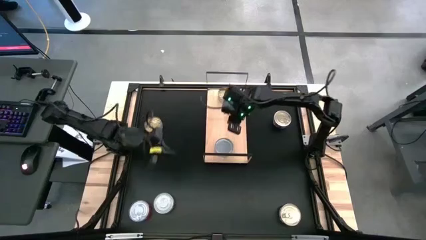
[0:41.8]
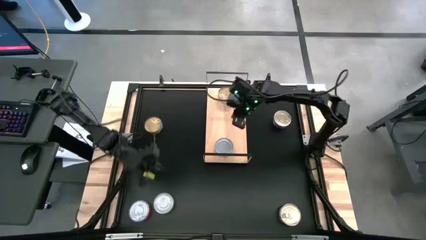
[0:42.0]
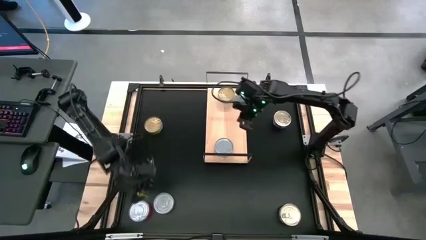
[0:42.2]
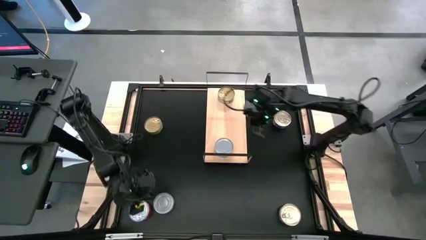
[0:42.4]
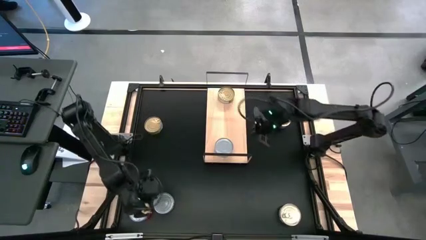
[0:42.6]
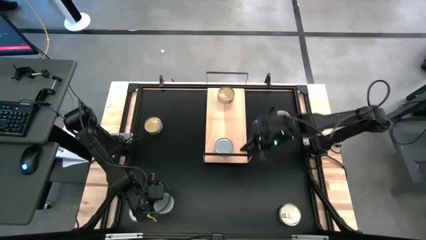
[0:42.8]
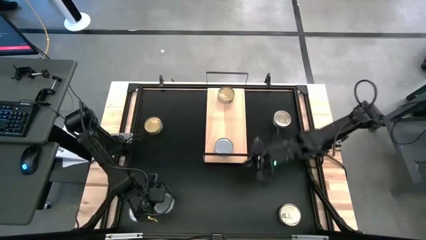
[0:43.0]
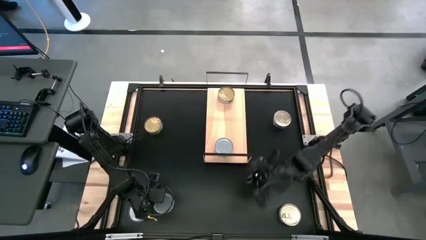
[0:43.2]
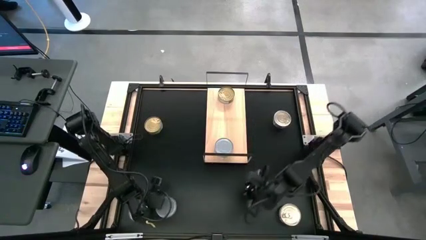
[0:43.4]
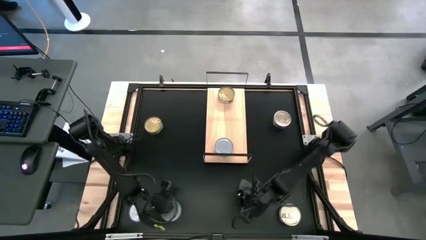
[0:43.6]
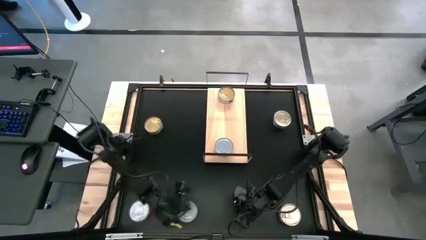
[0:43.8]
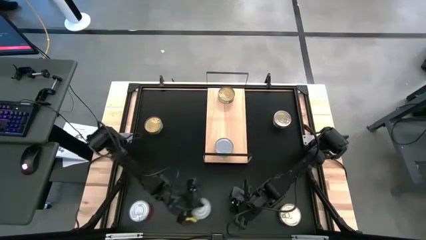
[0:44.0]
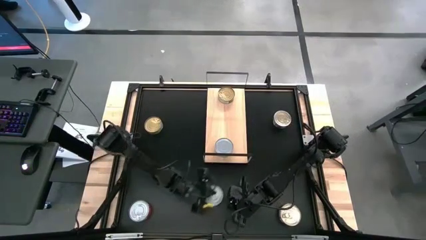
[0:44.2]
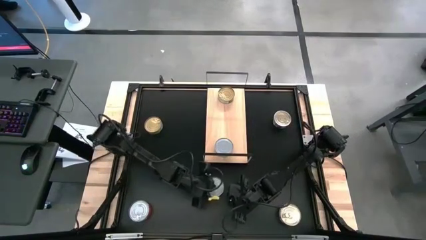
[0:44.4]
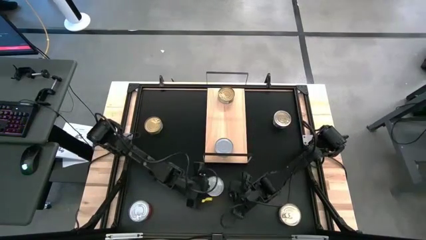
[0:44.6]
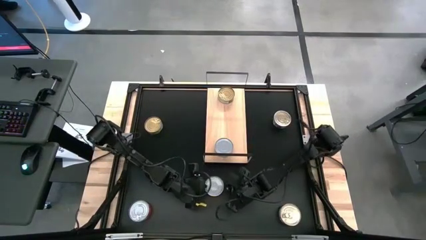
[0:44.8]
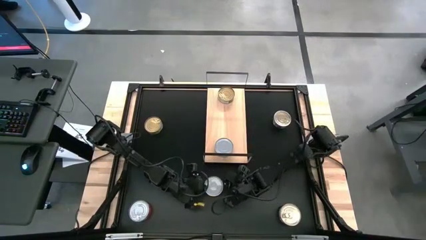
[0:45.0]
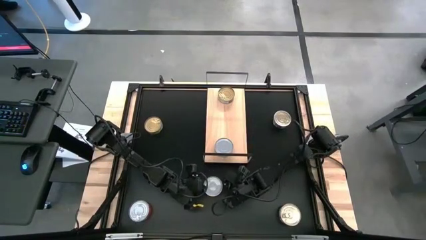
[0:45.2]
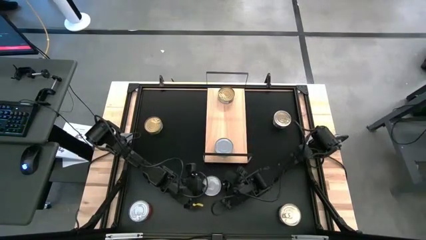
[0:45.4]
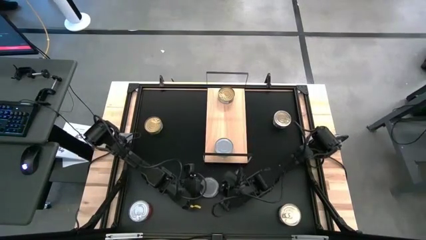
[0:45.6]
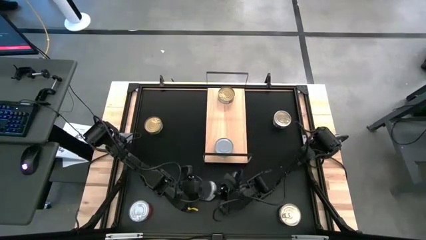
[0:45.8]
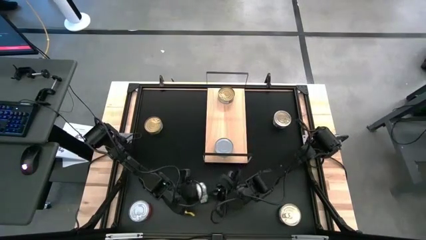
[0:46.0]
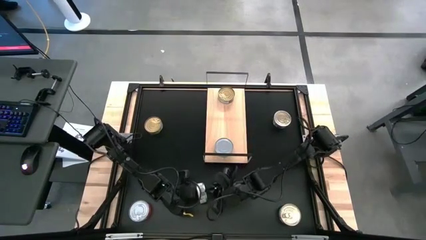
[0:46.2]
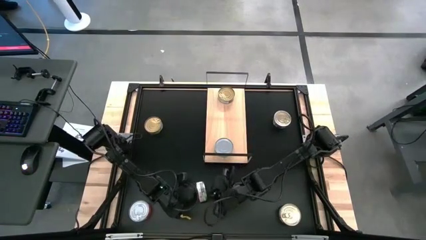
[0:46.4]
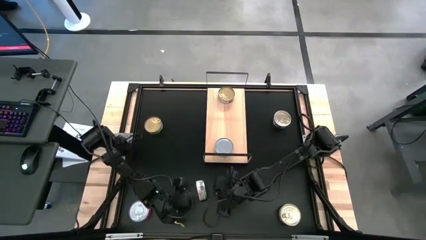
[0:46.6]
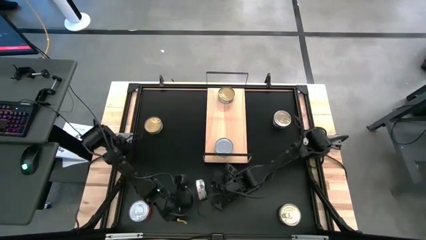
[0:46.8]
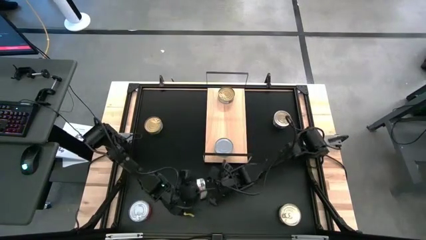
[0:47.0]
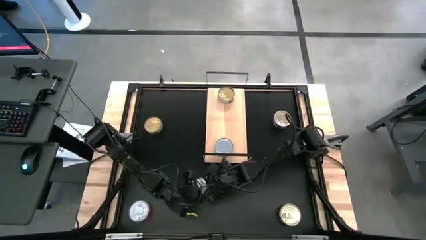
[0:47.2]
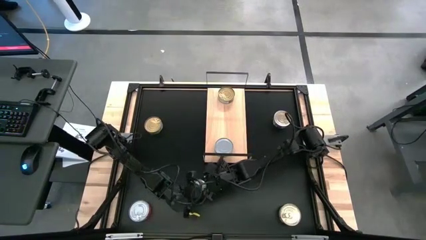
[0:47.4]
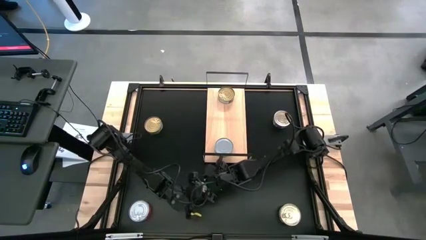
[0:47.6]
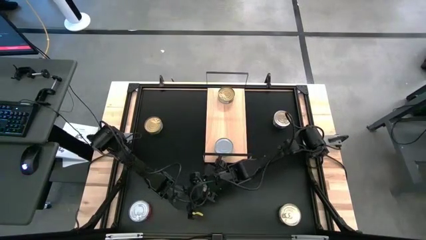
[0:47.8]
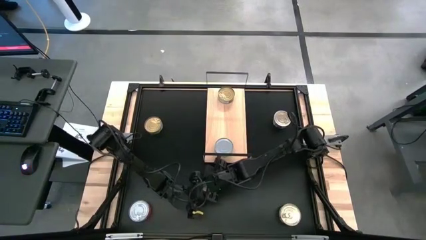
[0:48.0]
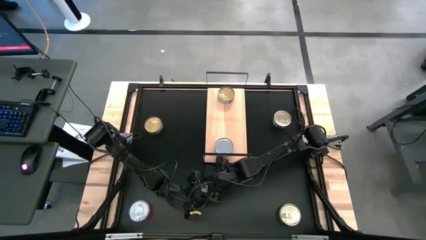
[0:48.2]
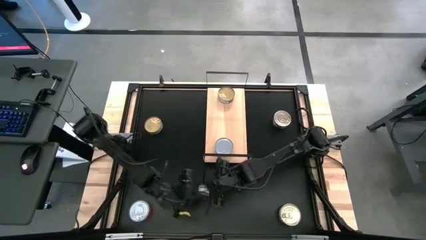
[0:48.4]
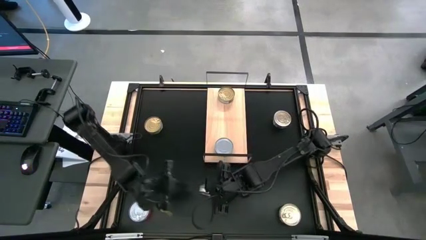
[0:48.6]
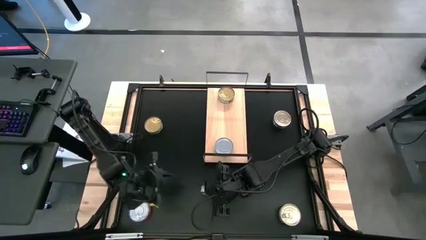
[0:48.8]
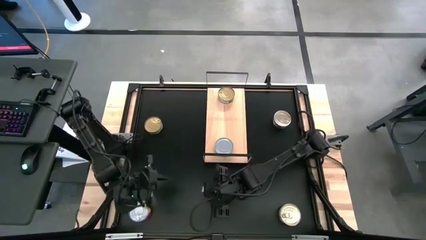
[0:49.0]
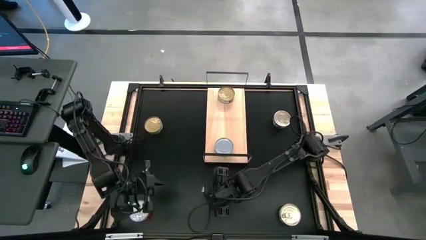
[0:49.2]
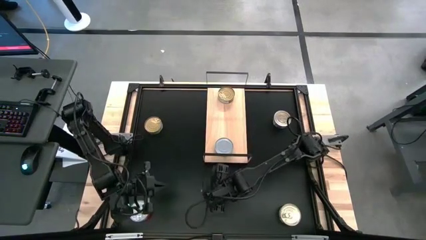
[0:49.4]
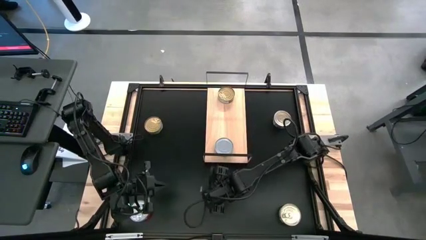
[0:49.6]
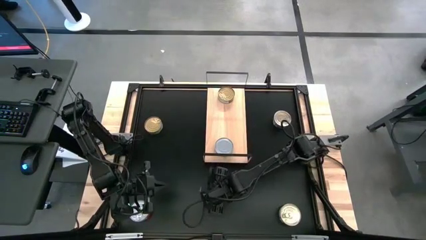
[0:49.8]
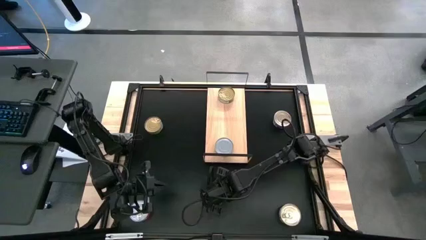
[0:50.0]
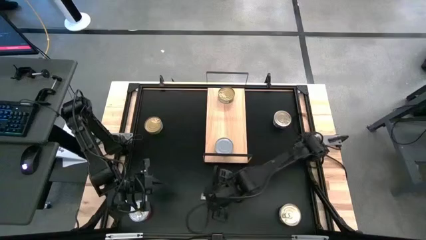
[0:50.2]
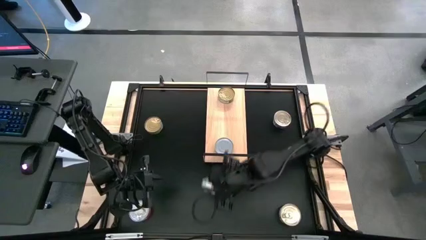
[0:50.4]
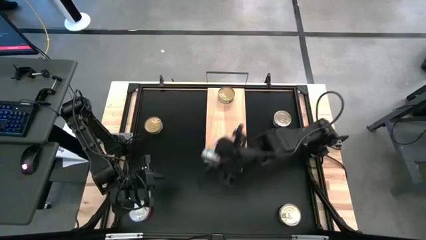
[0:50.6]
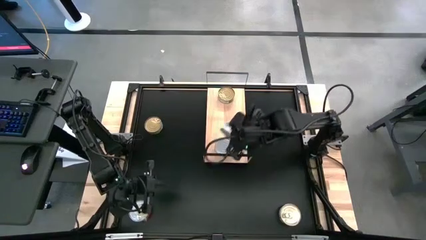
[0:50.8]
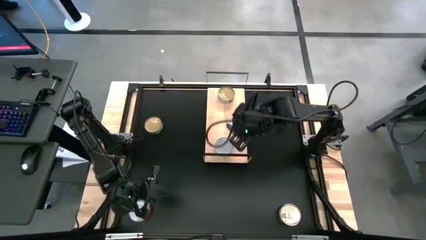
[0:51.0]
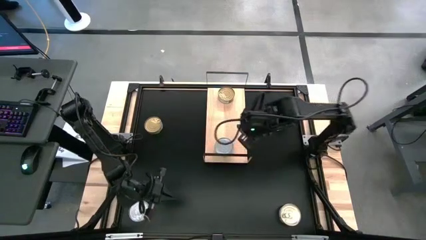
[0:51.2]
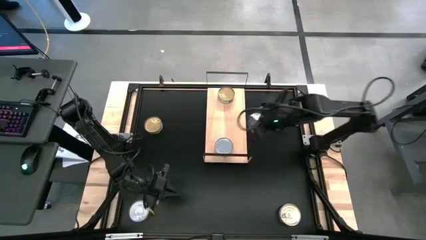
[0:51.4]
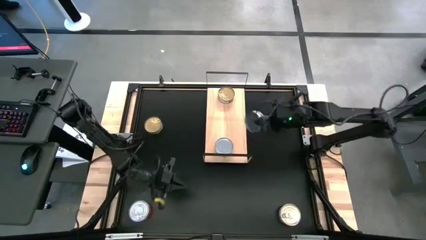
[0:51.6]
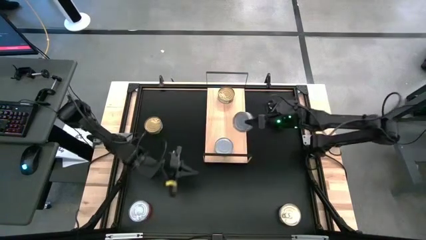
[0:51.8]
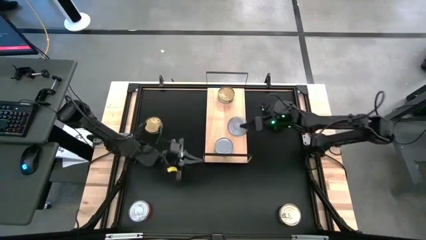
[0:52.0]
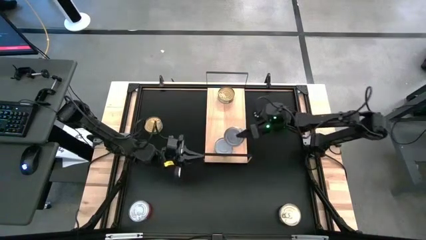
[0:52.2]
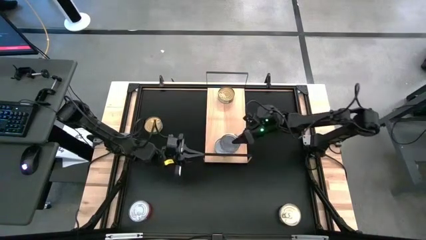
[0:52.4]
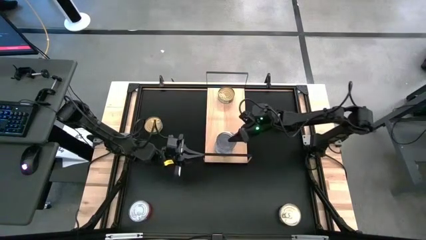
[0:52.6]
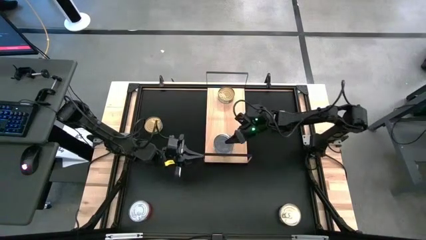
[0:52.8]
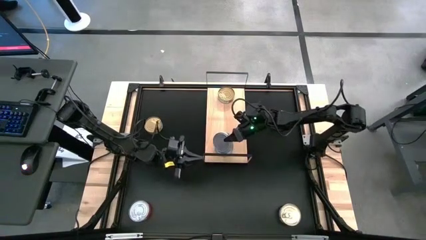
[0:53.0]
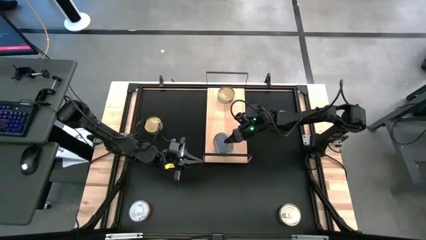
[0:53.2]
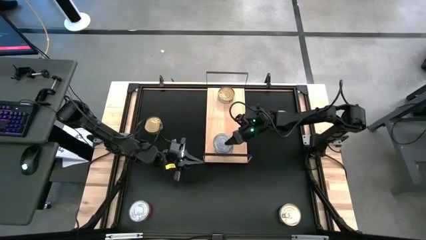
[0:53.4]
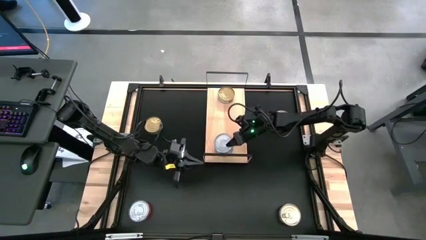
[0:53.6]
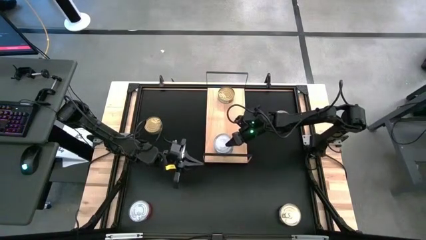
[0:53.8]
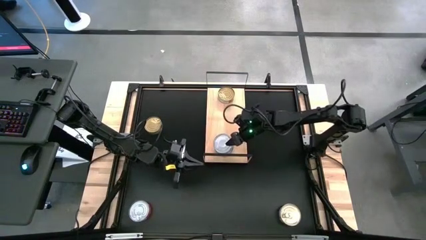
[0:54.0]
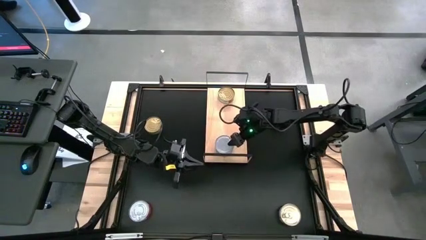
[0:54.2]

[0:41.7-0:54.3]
Task: Stack canned seafood by type on shelf
Stack the white-green tuna can on top of the other white-green tuna can on the shelf
